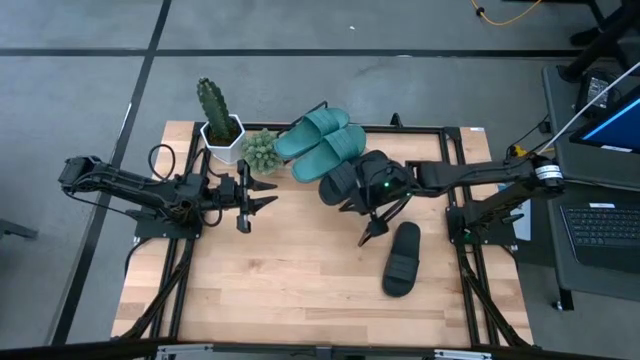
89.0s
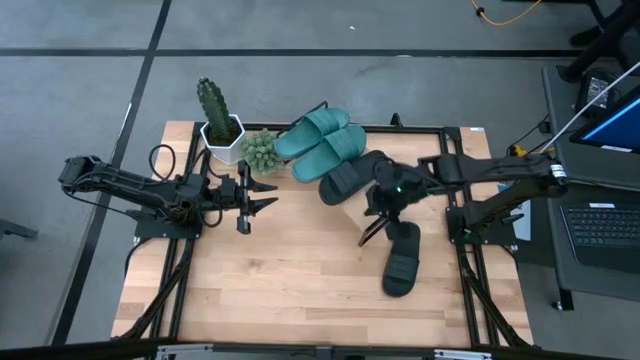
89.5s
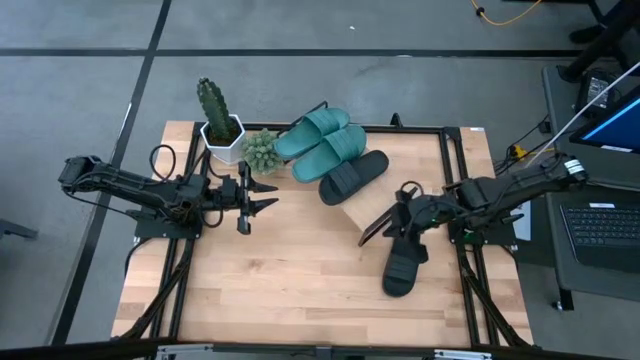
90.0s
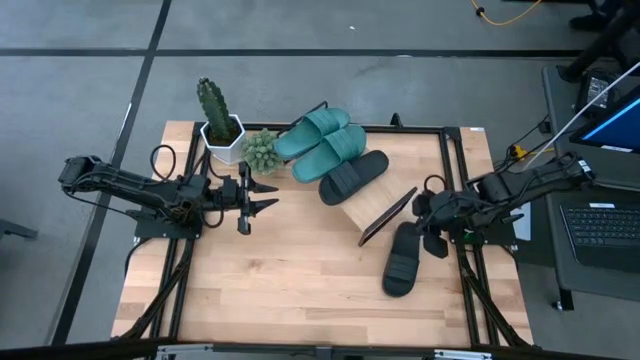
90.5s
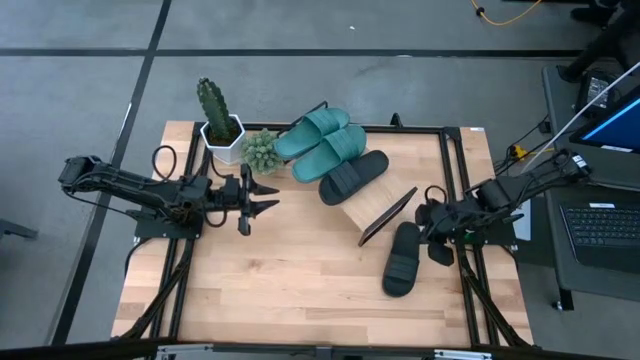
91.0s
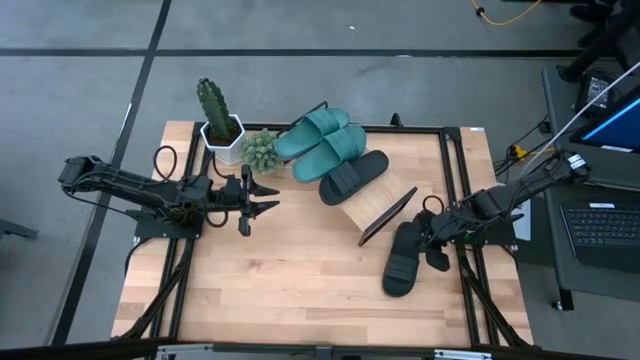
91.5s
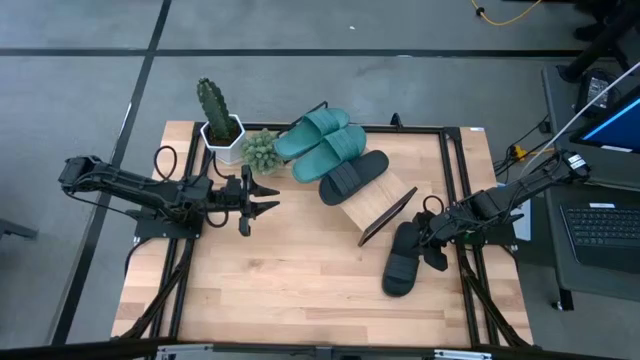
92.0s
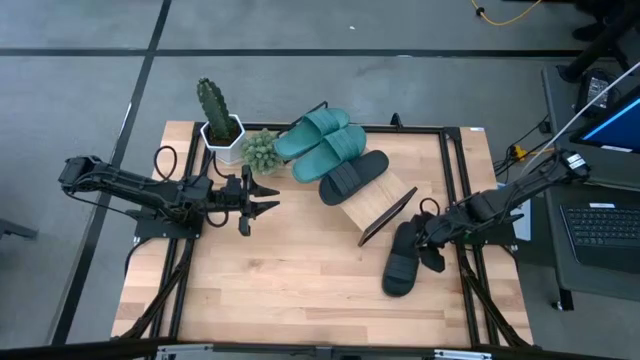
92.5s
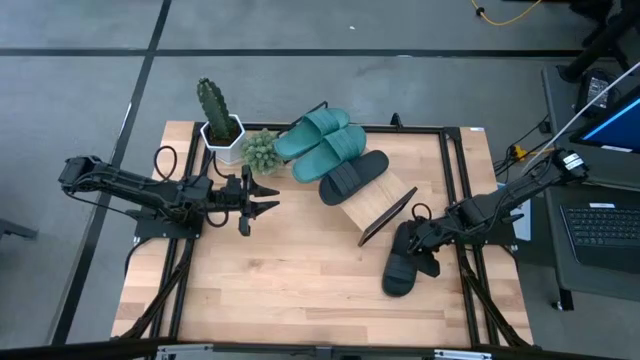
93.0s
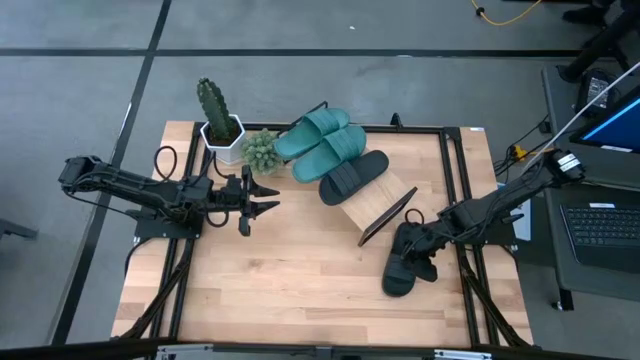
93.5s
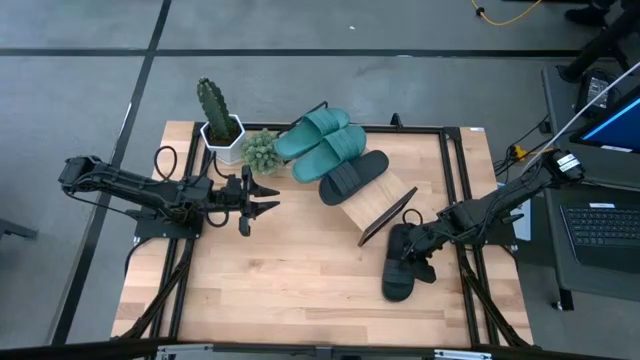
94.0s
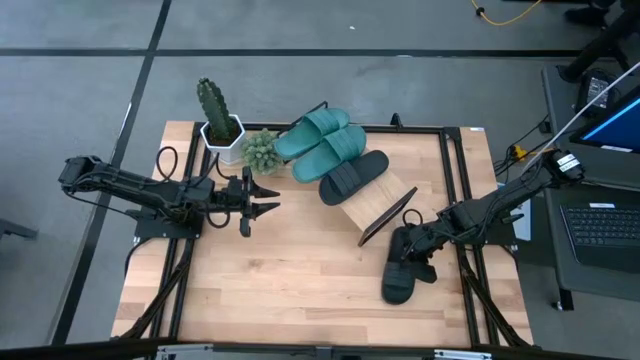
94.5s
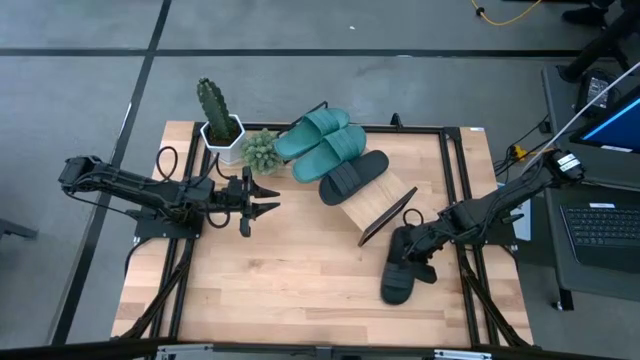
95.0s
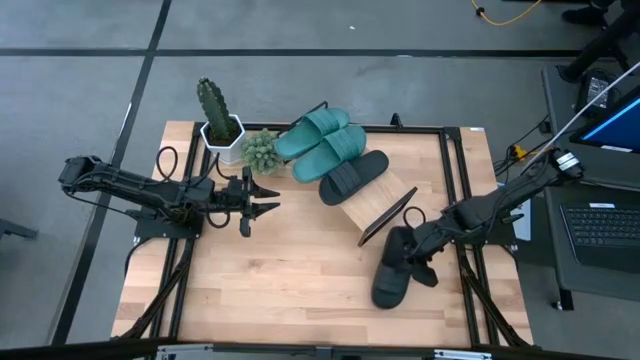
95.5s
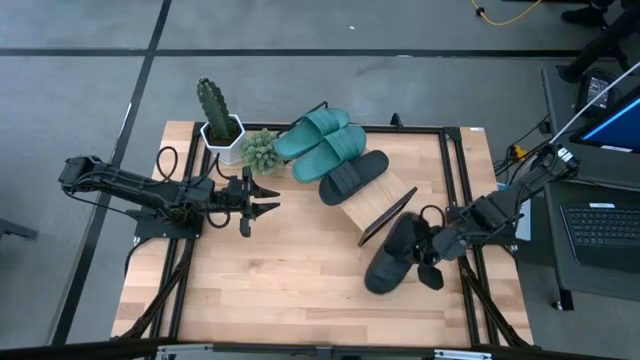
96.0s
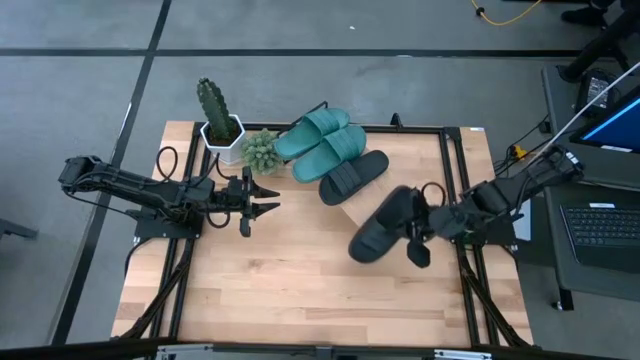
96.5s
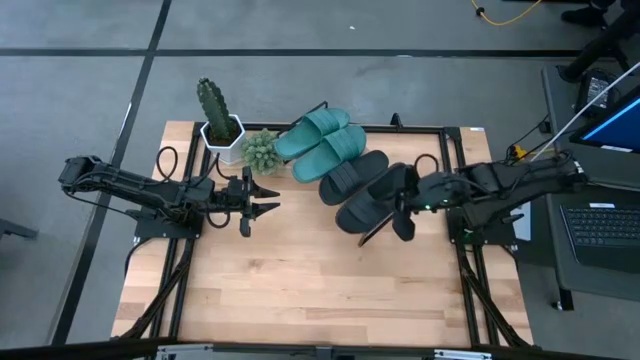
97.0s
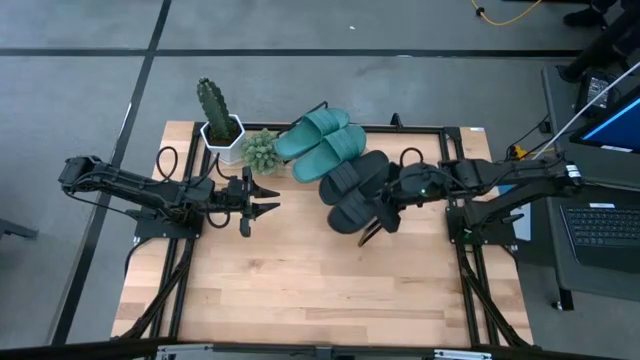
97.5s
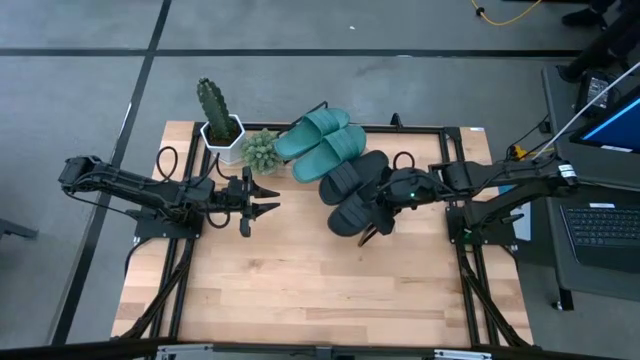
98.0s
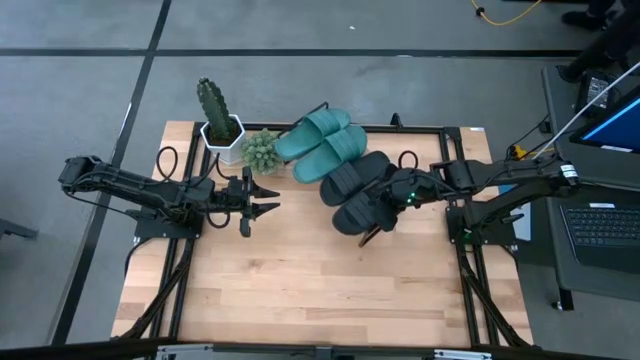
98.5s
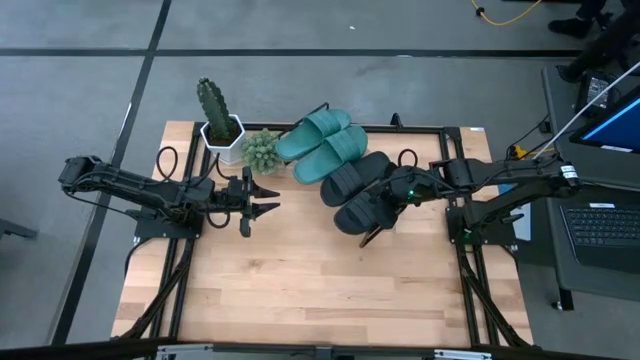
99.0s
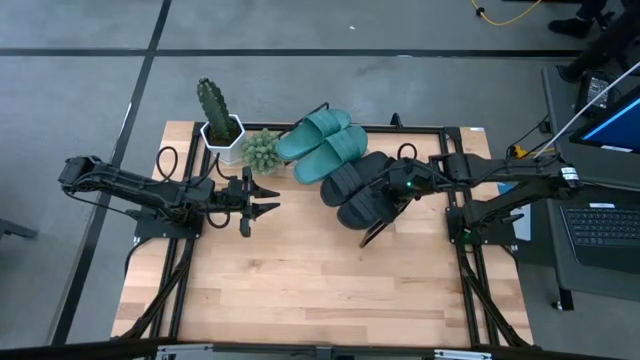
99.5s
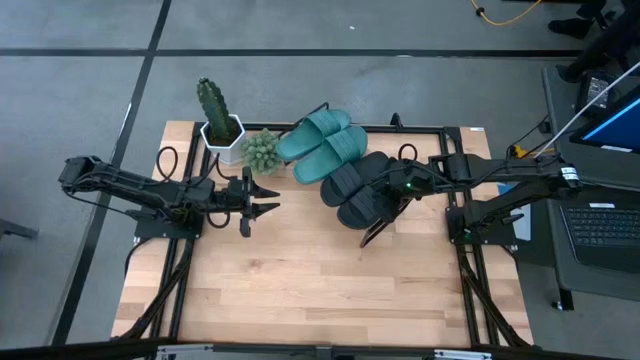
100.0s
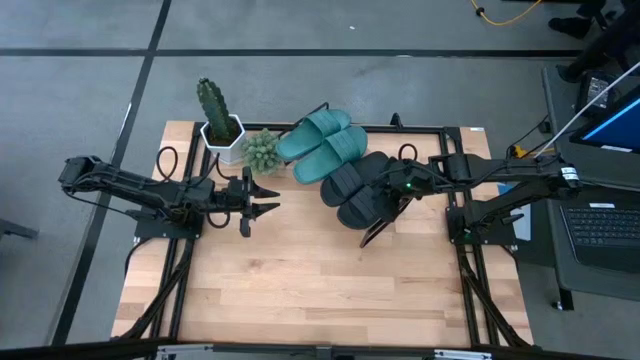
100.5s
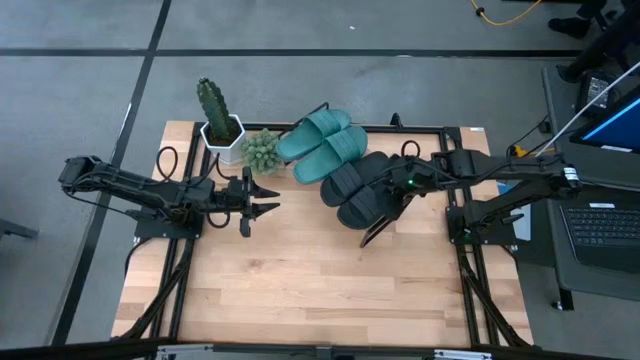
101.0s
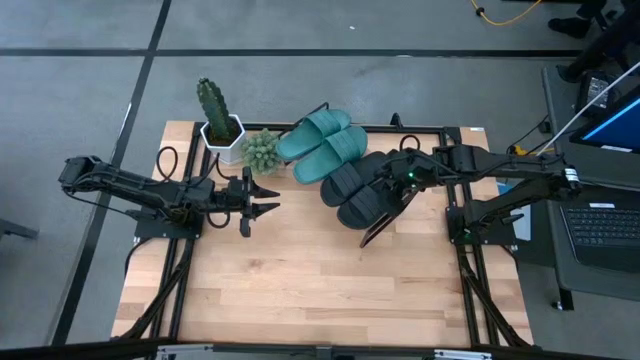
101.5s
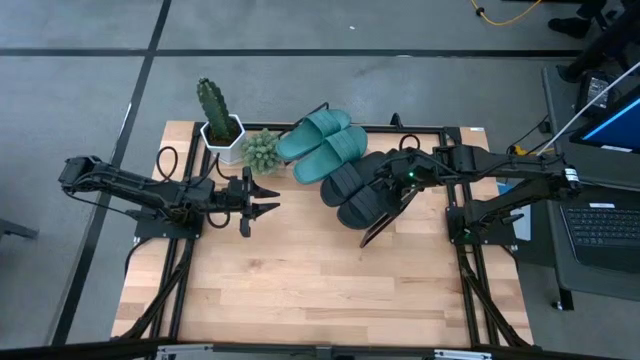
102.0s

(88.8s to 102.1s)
Task: Pick and place slides into the shelf
Put the black slides on the shelf

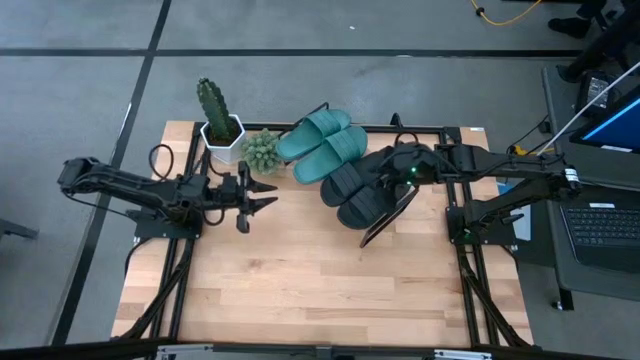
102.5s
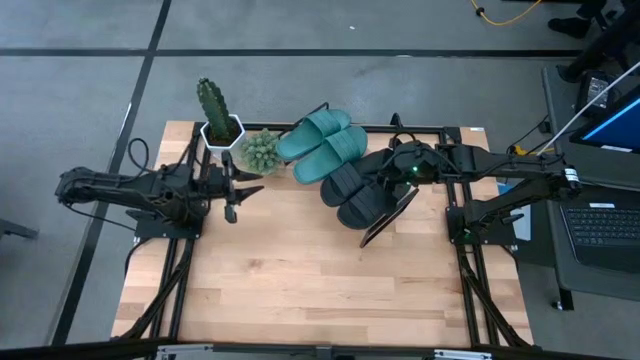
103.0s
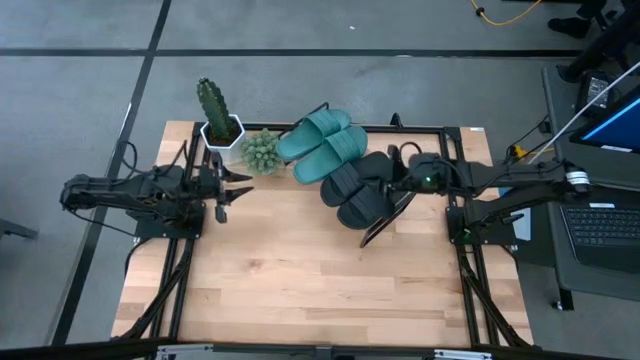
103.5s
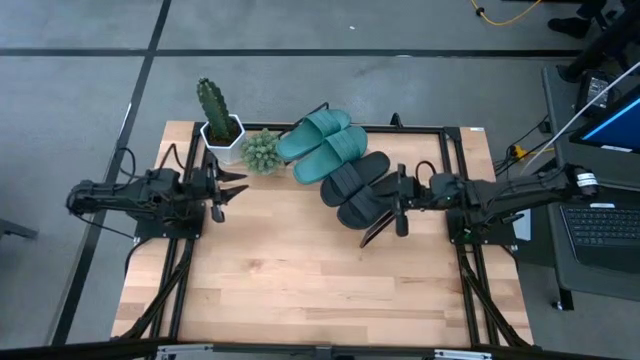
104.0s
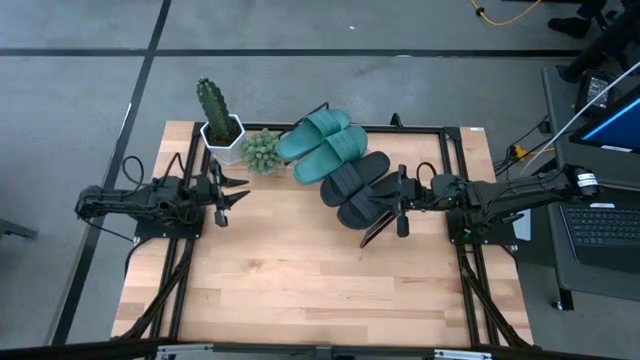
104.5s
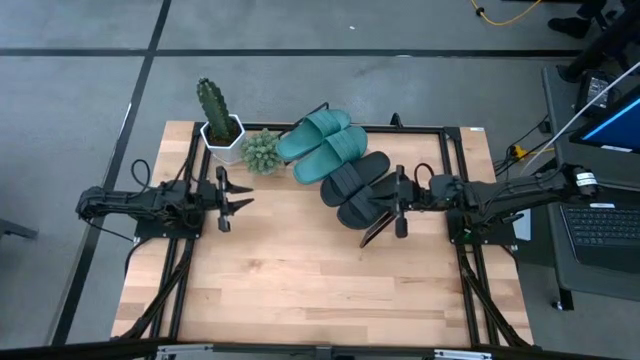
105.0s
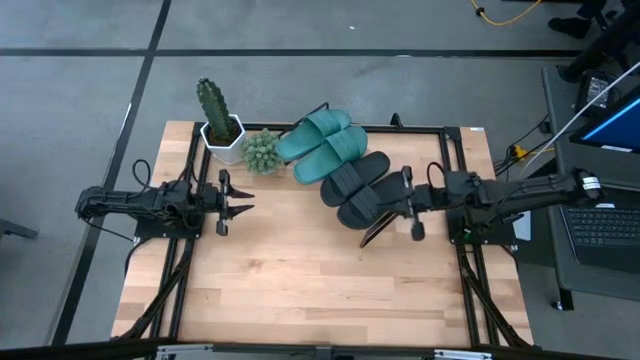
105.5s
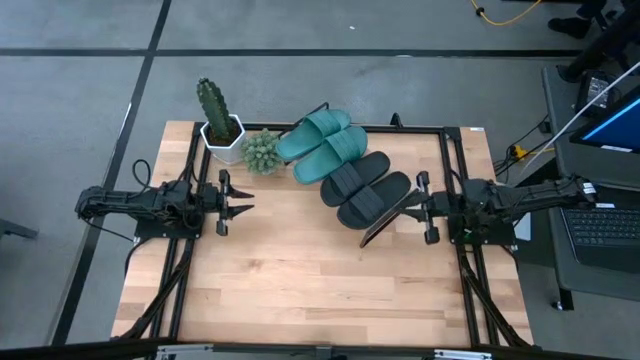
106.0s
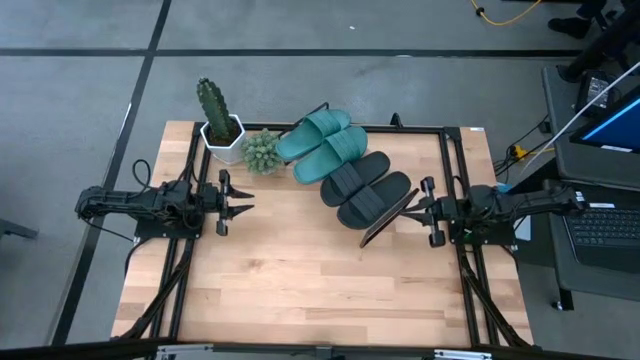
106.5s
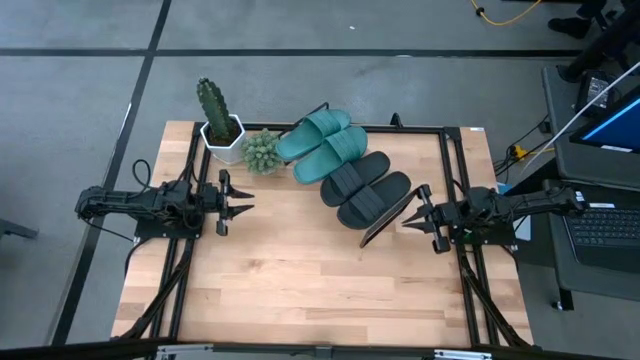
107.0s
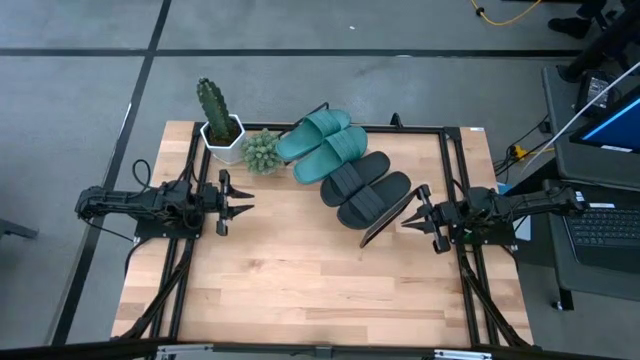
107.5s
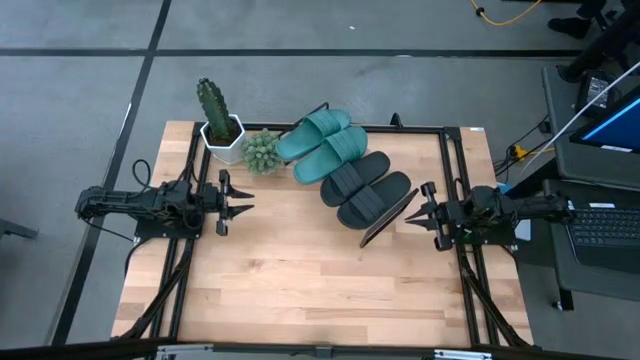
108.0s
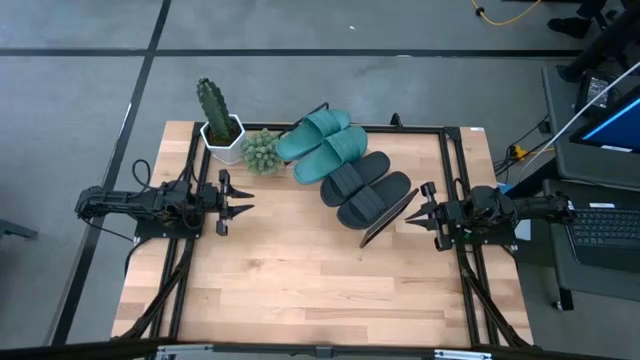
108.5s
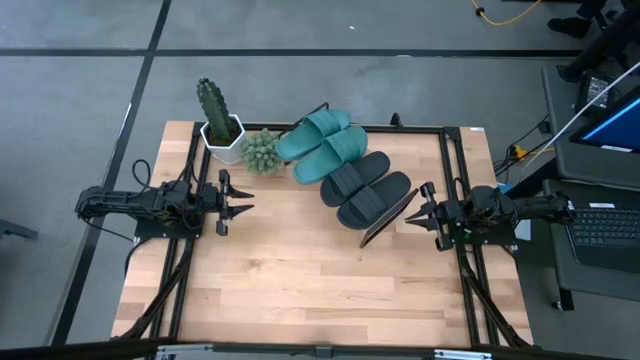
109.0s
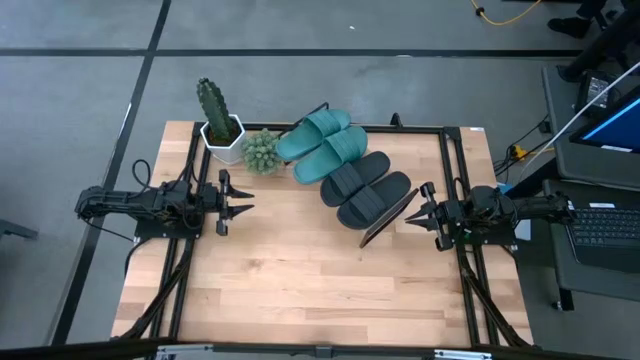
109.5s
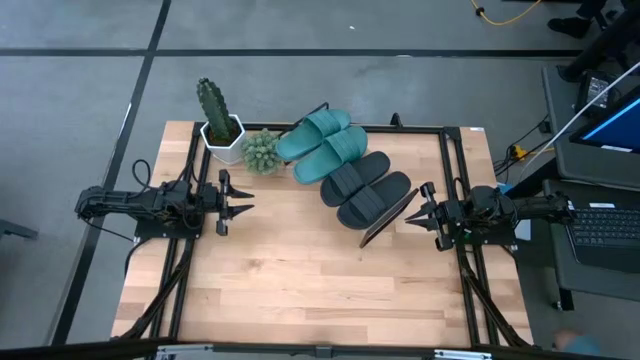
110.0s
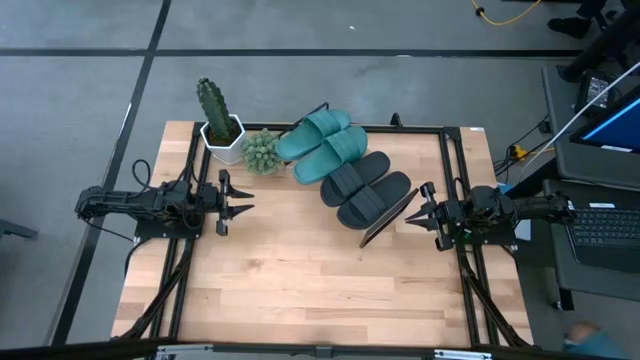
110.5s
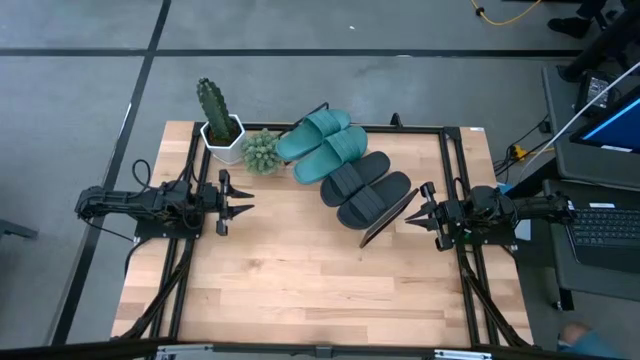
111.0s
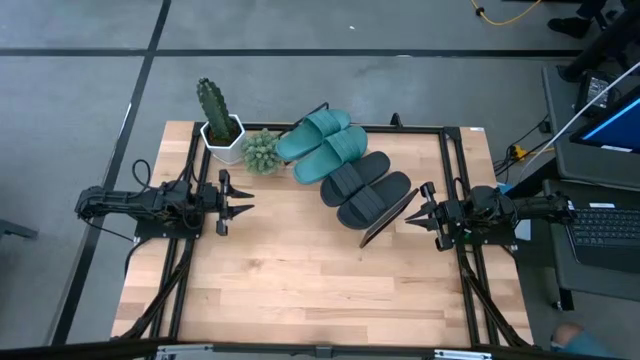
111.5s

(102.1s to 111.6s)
Return to Home Position

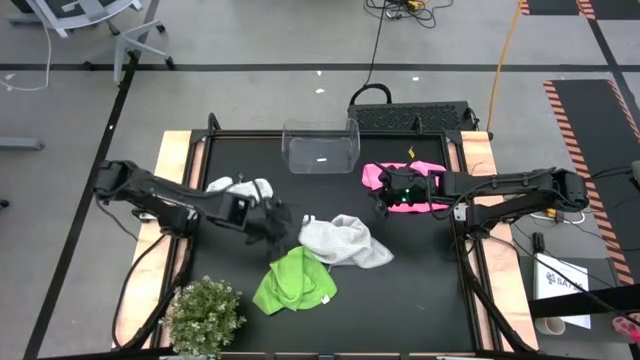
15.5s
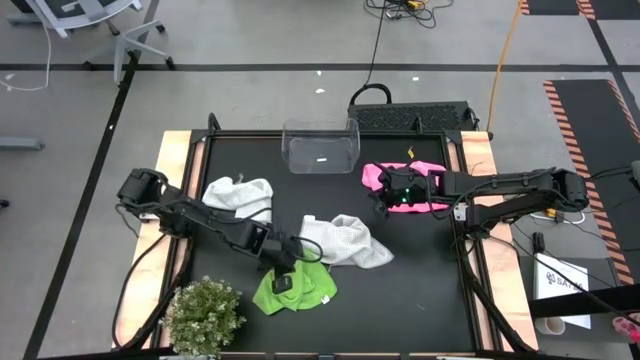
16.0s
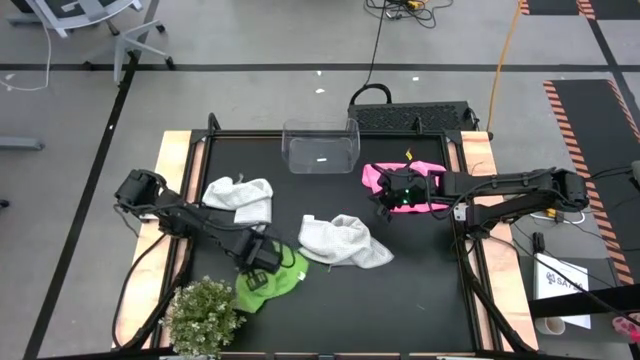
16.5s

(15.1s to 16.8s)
Task: Fold microfiber towels
Adjust the green microfiber cloth
